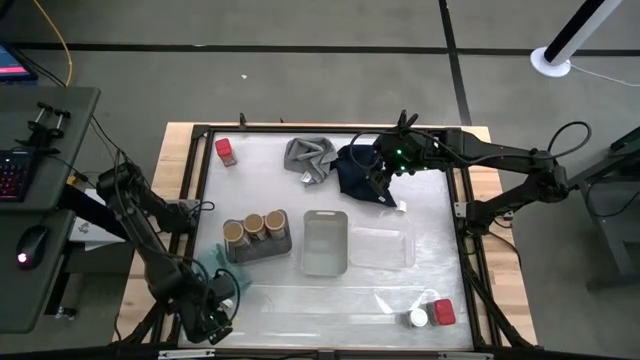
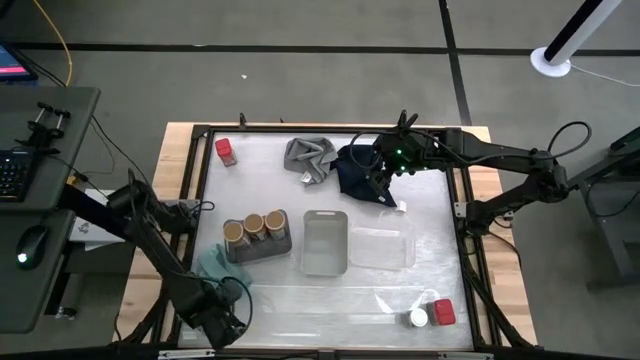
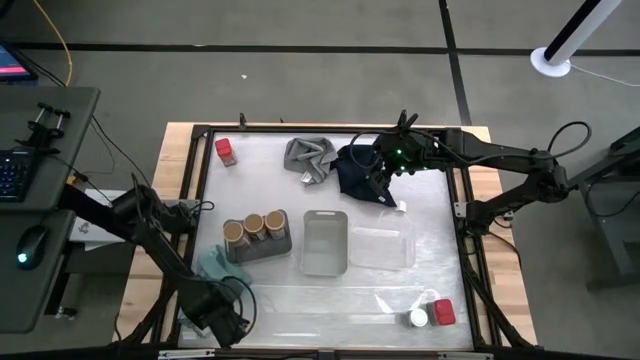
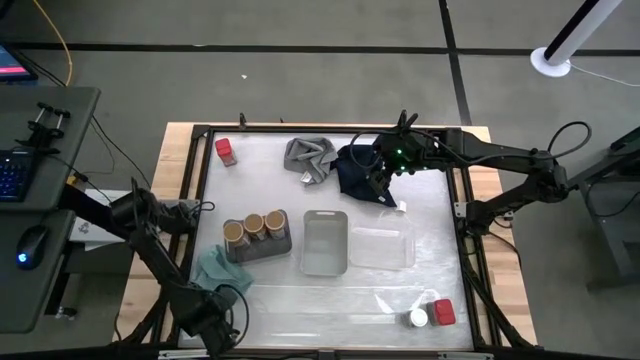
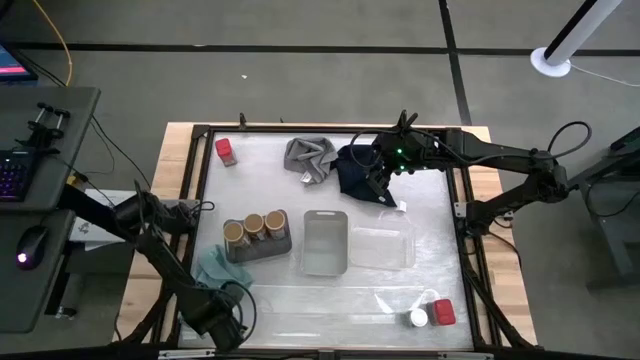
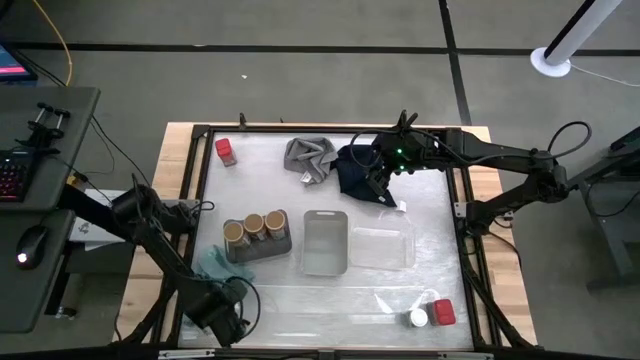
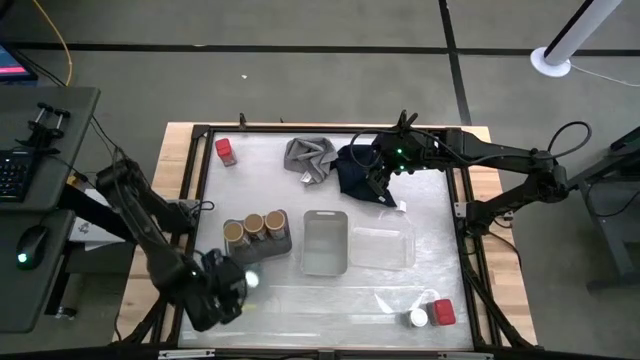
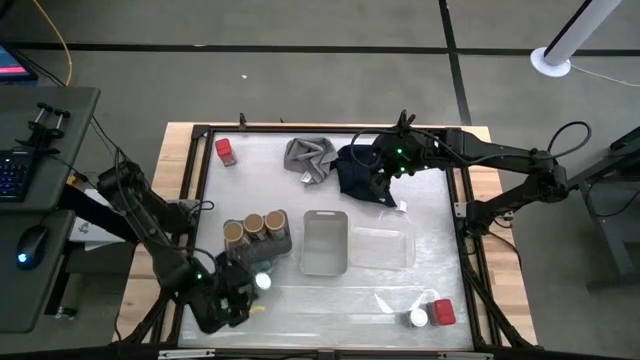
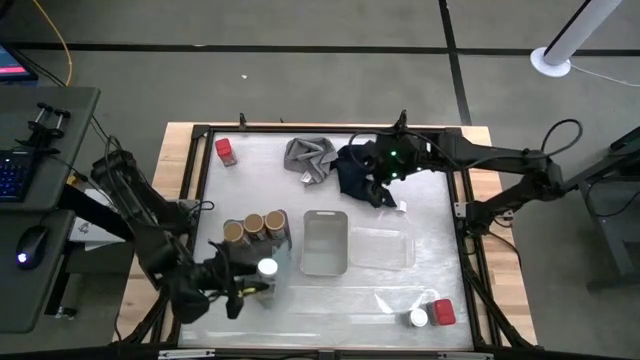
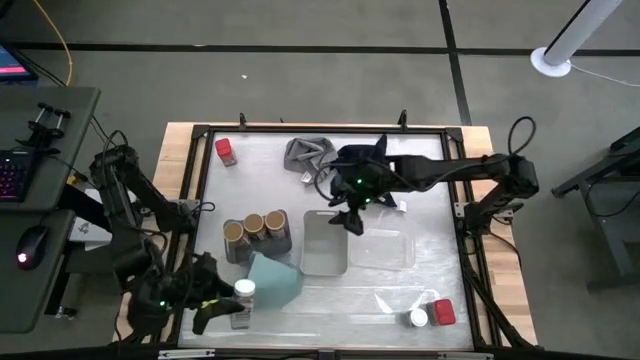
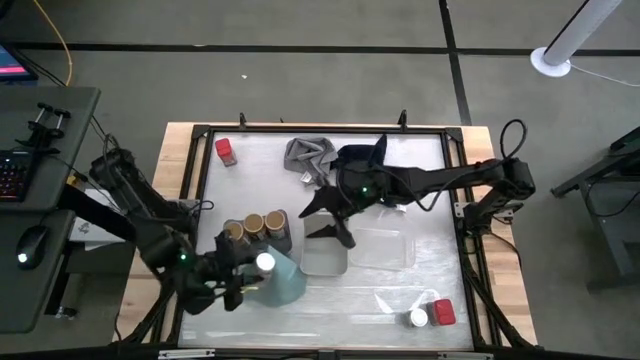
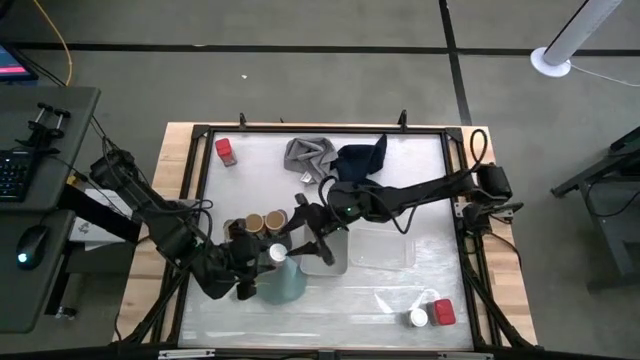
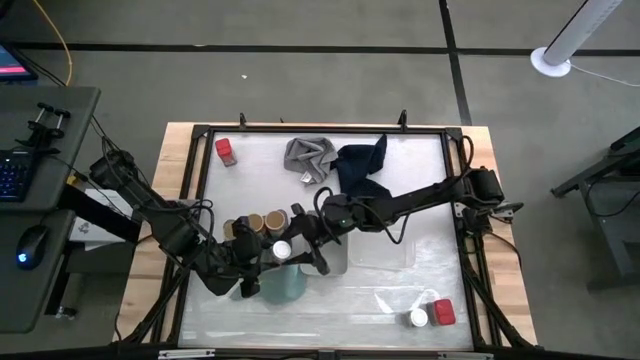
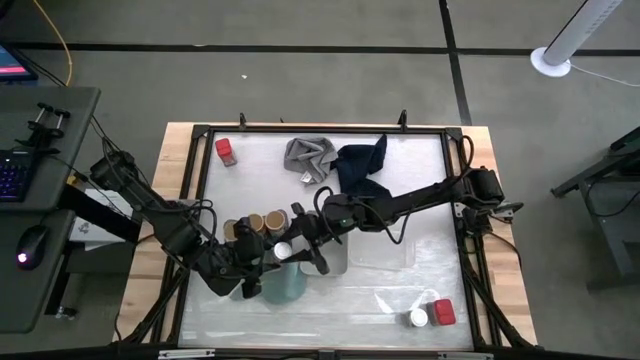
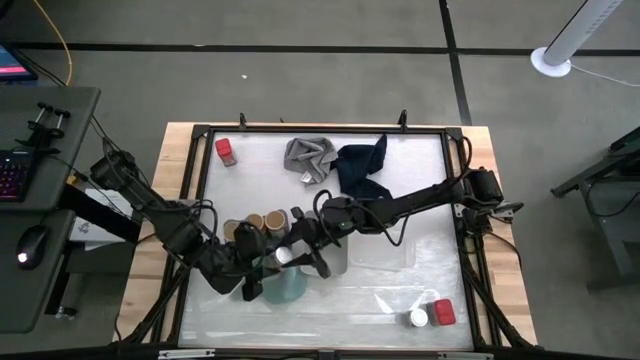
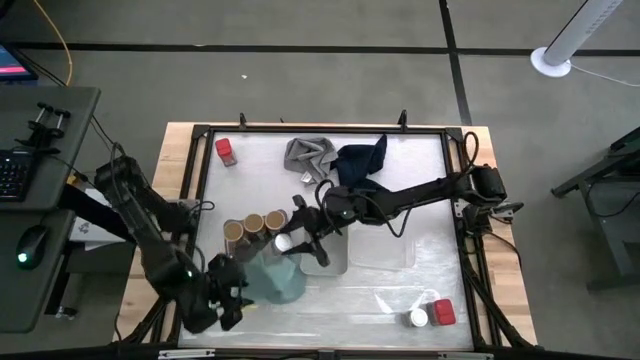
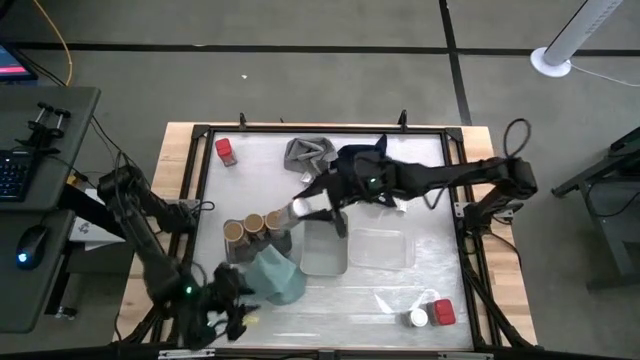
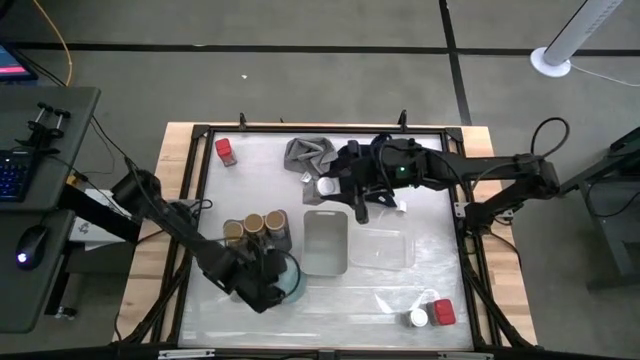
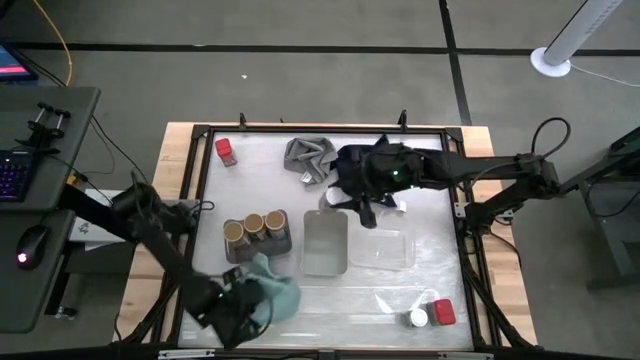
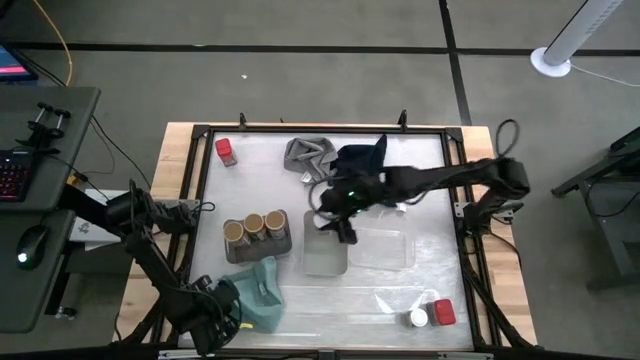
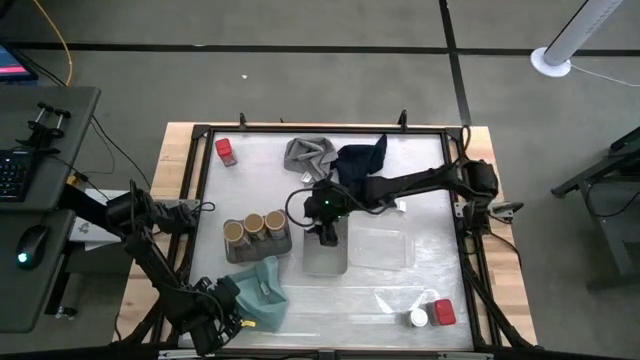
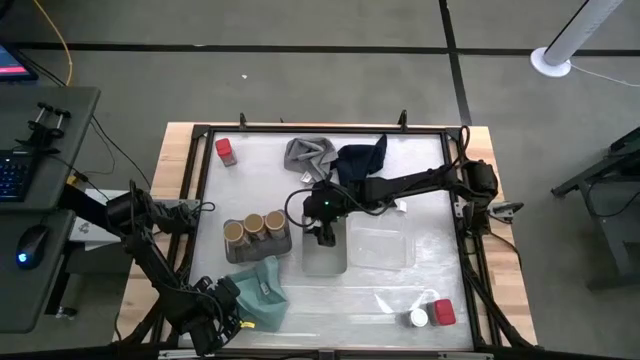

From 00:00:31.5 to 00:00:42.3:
Task: Sort spices by type
Put the left white seasoning bottle into the gray bin

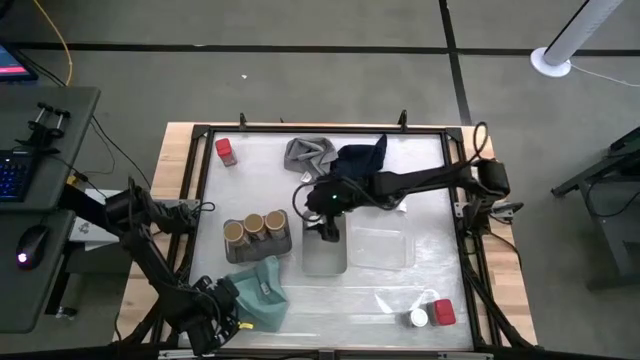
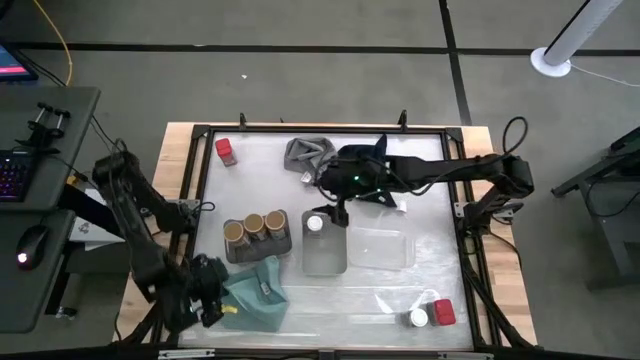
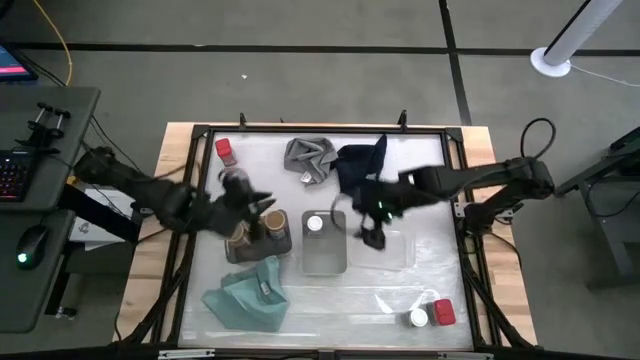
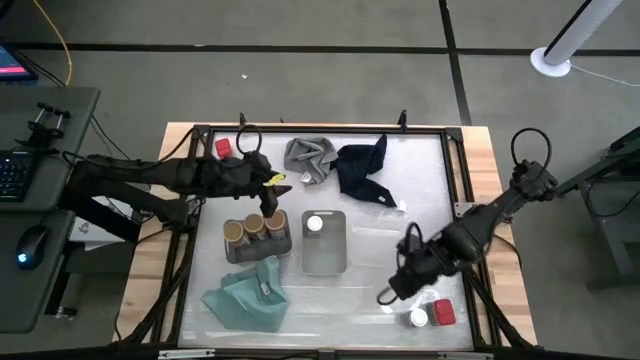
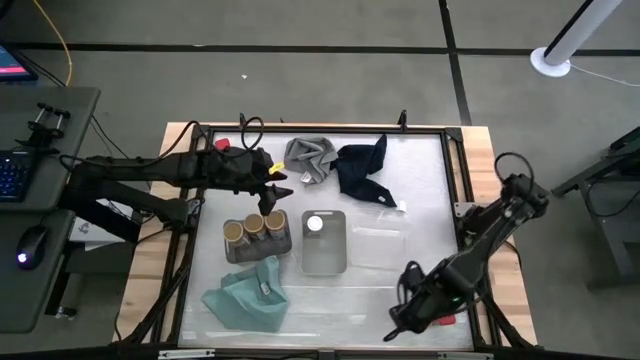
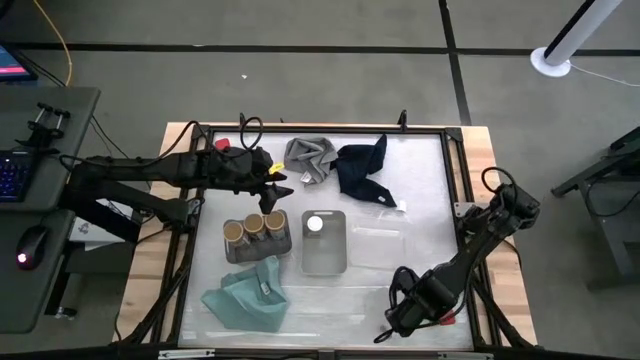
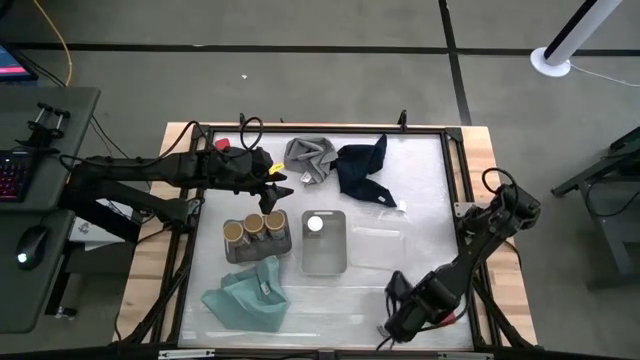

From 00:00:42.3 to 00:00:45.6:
Put the white seasoning bottle into the gray bin

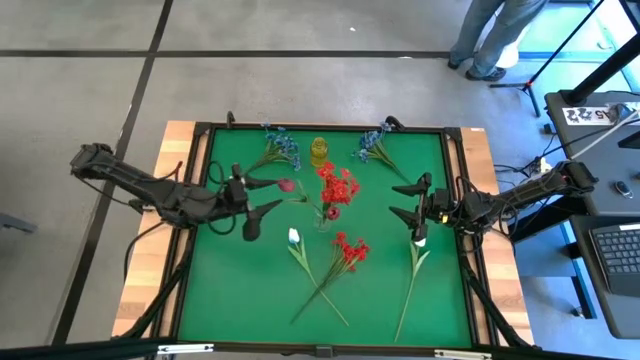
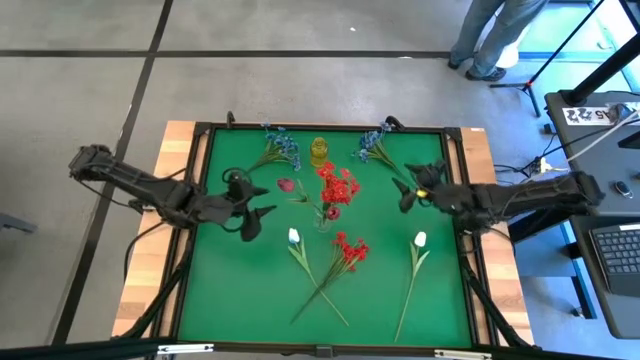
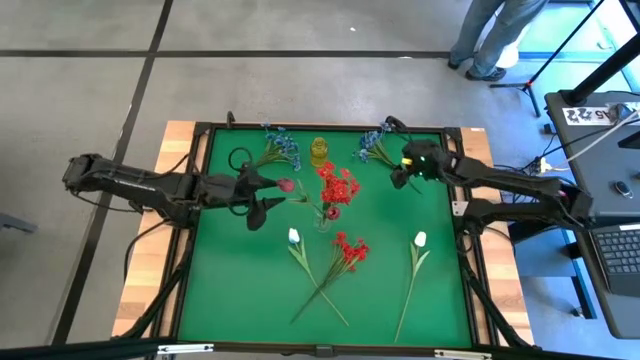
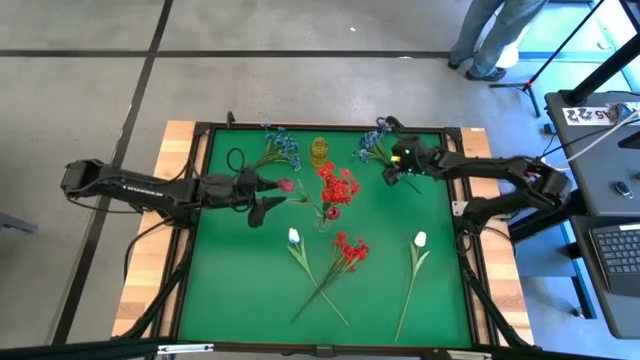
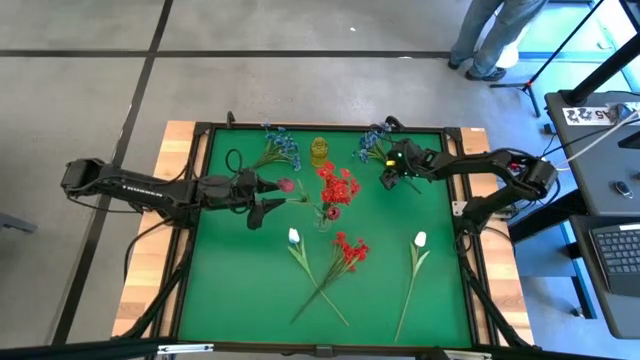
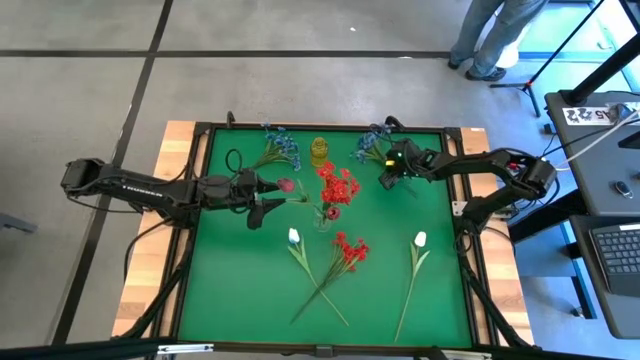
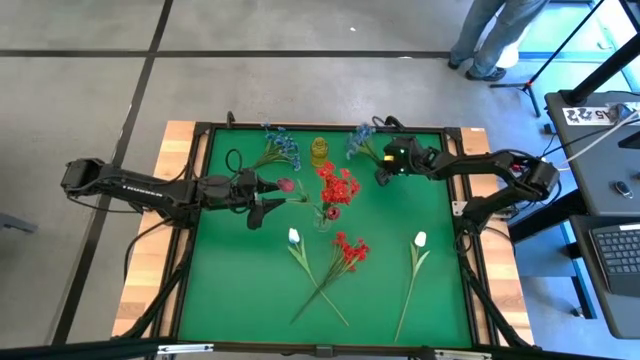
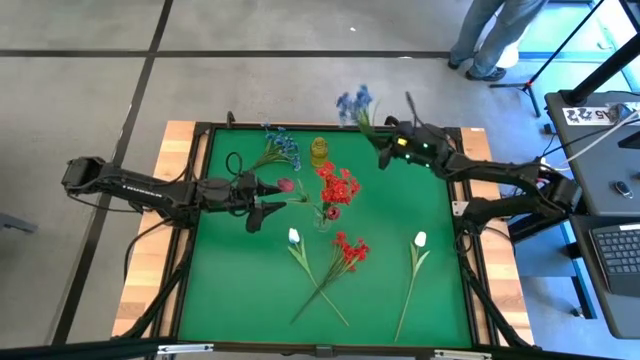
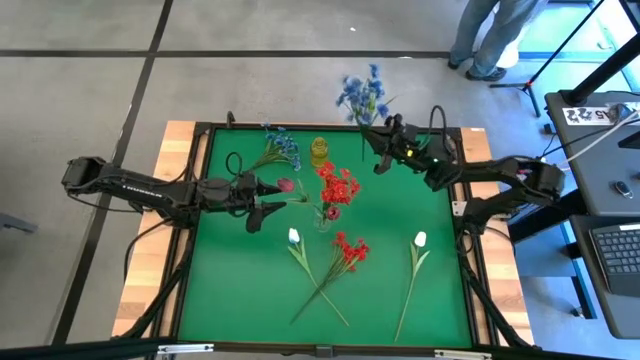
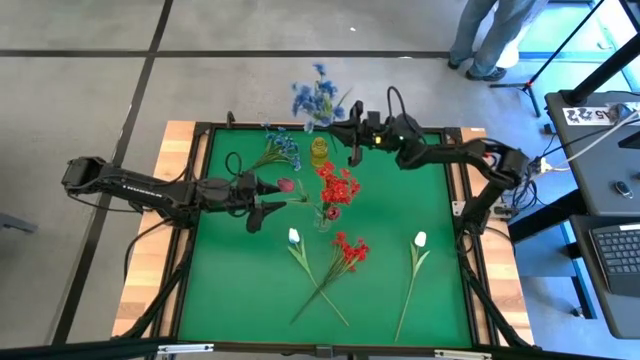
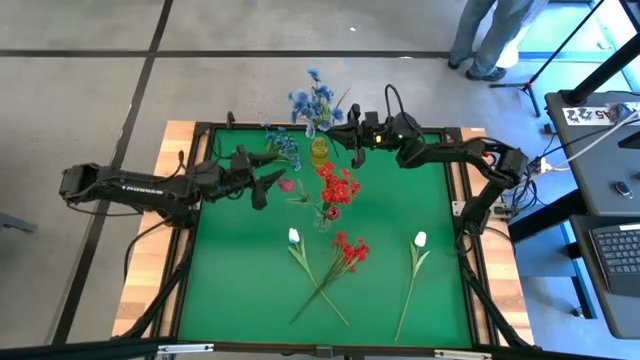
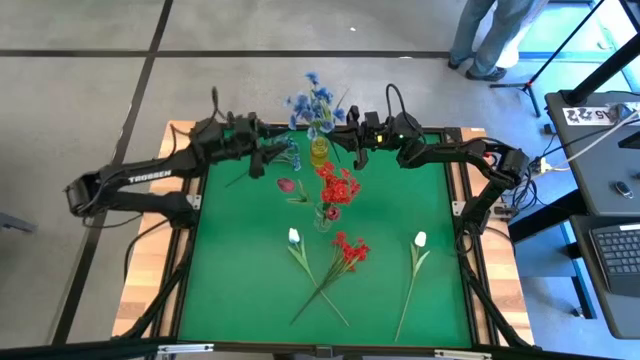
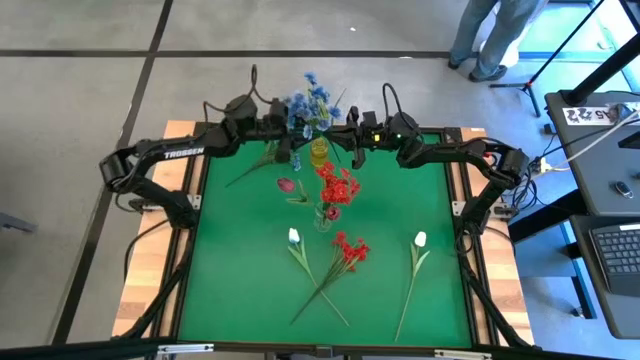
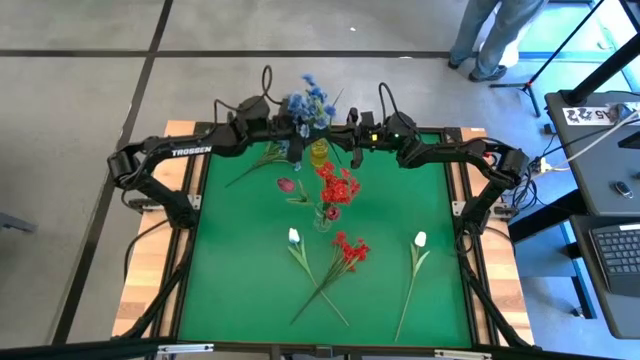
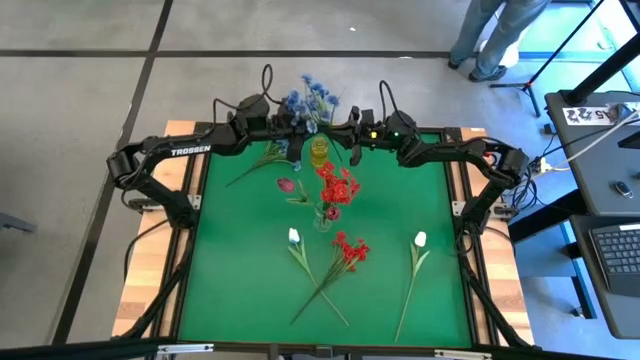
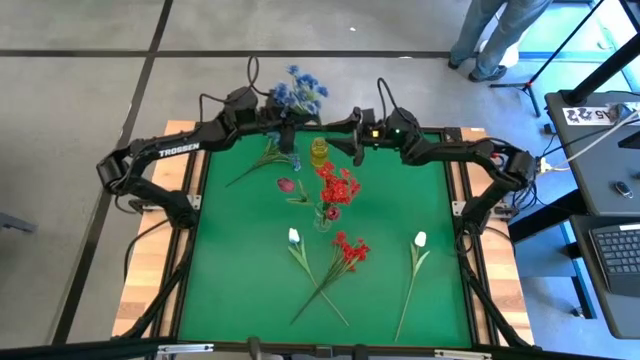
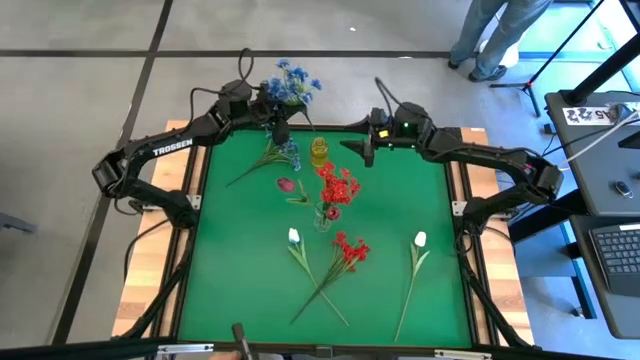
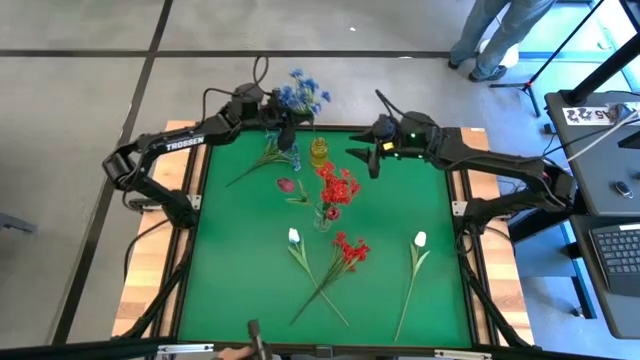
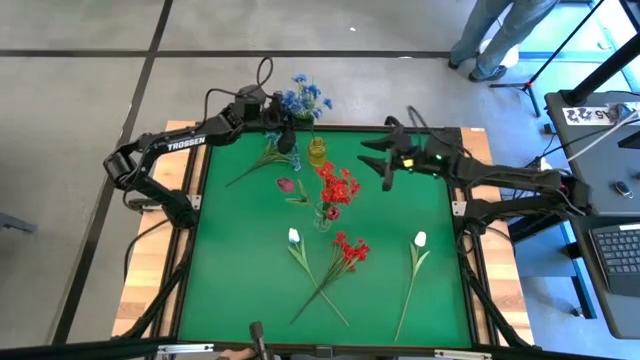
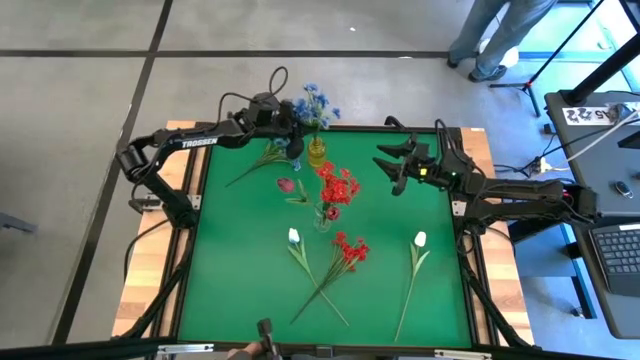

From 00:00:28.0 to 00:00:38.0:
Task: Sort flowers into vase by color
Put the right blue flower into the yellow vase
